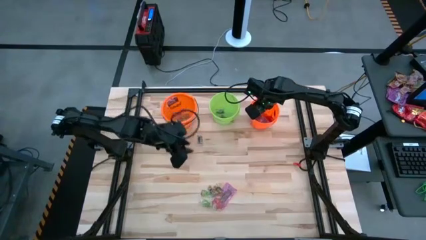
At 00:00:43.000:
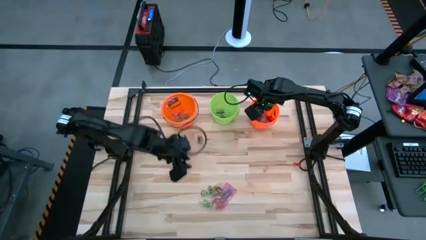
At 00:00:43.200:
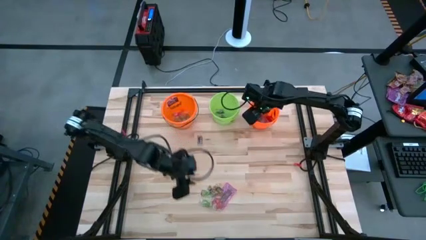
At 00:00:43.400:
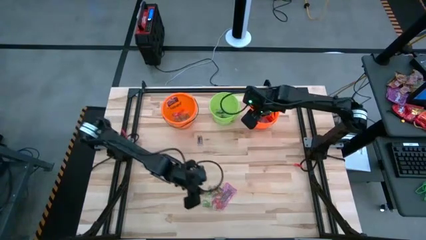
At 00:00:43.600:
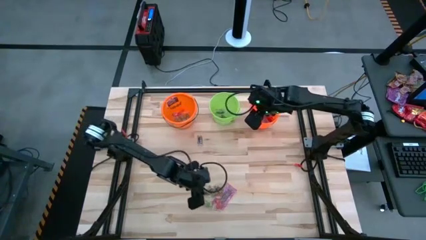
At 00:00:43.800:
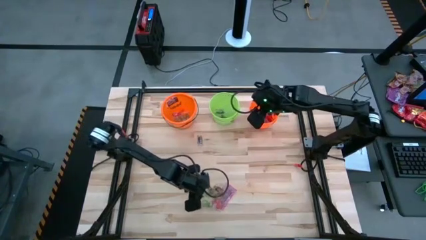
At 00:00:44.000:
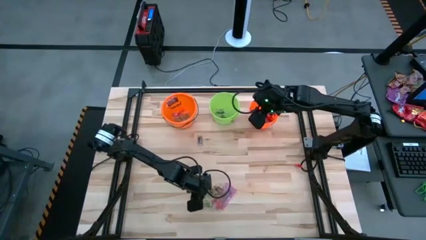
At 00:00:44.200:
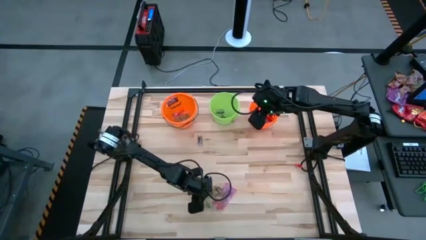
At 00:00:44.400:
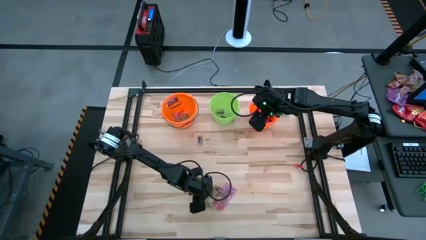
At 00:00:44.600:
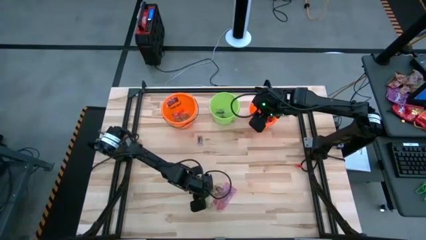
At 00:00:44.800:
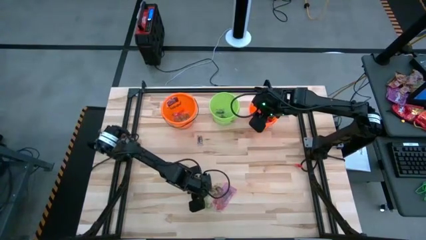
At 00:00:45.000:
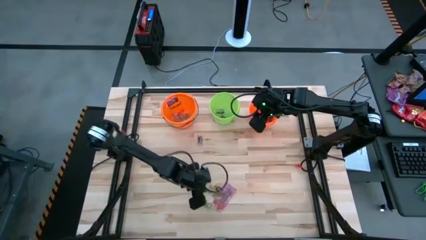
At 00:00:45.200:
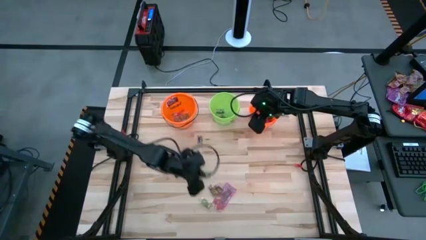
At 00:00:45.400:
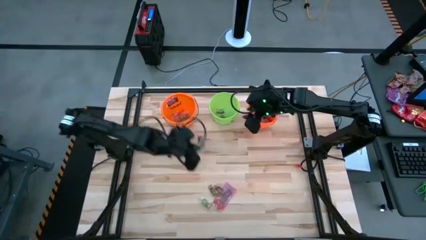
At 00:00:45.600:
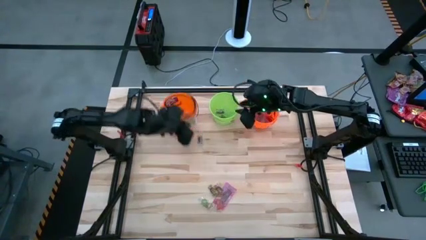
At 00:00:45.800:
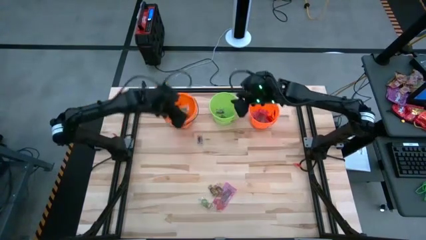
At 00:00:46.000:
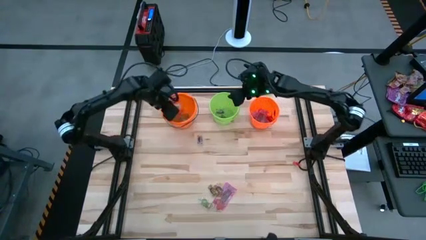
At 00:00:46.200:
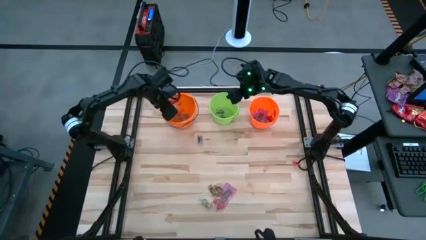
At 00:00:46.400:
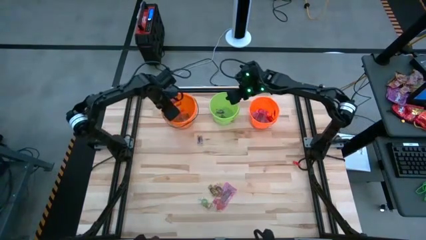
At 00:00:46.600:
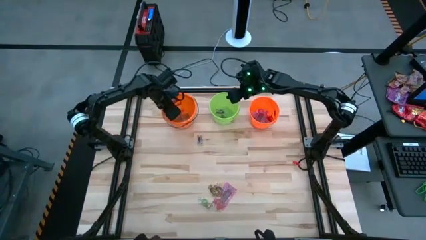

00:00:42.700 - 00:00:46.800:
Task: Sort candy by brand, put in halloween buckets
Put the green gummy into the left orange bucket

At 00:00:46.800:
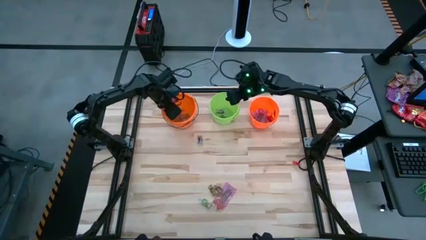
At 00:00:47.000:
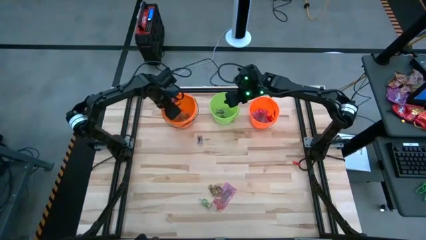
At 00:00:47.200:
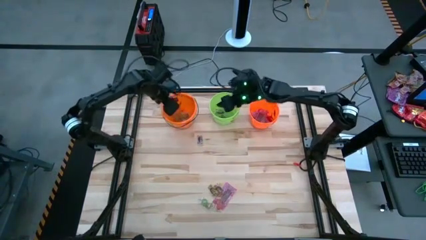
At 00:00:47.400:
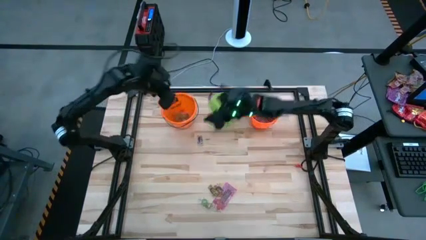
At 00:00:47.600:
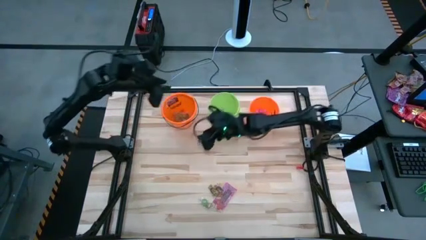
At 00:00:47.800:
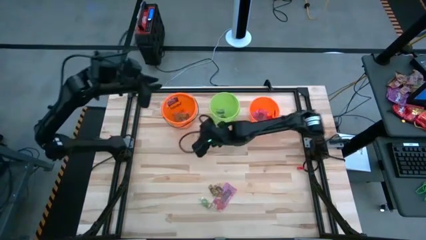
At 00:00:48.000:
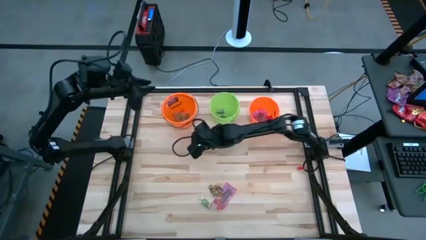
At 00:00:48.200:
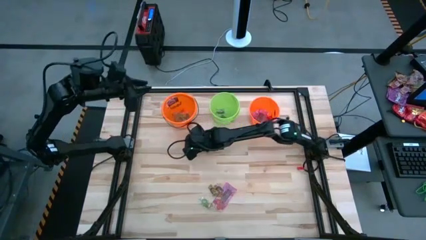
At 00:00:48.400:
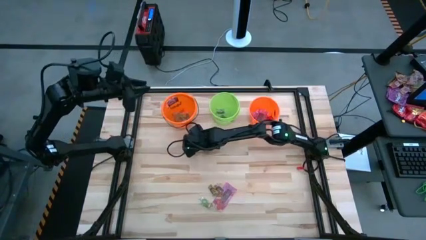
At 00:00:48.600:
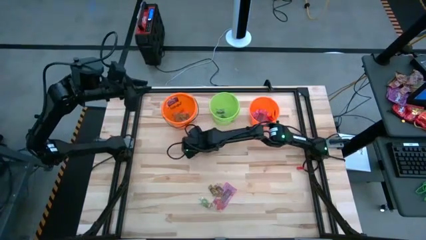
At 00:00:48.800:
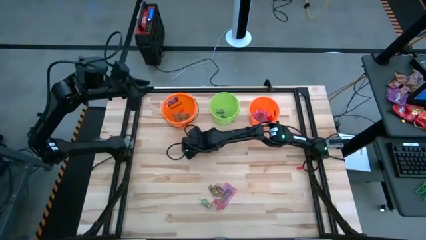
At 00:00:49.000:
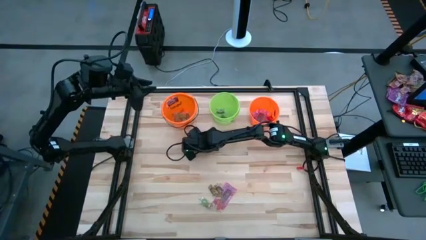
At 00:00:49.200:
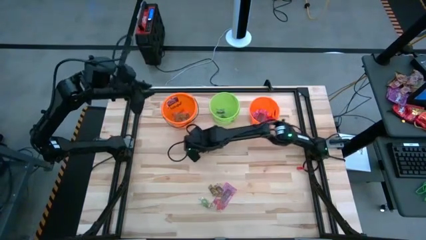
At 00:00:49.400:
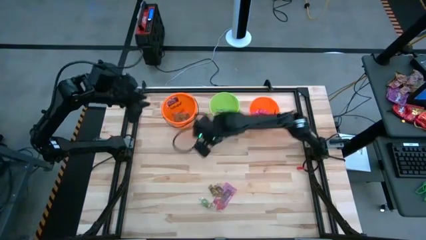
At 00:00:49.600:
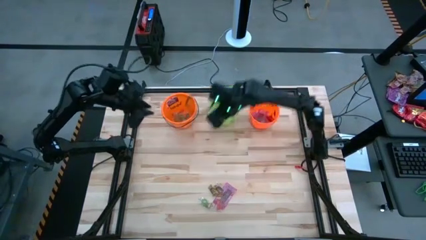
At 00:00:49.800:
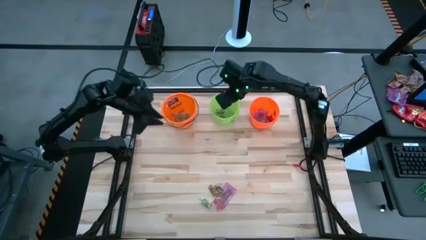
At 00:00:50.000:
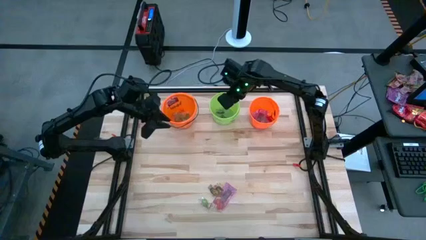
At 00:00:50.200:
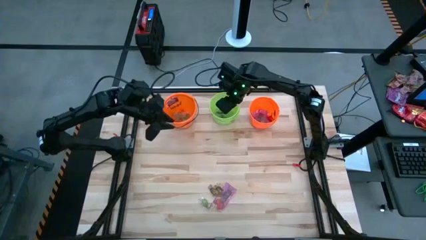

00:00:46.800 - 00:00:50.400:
Put the black candy into the green bucket

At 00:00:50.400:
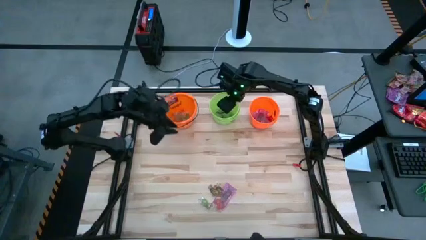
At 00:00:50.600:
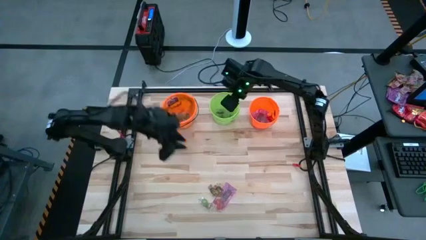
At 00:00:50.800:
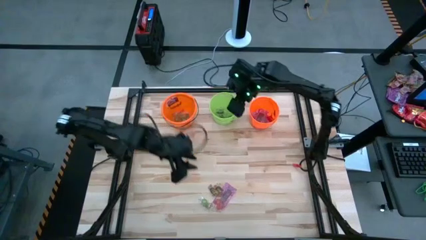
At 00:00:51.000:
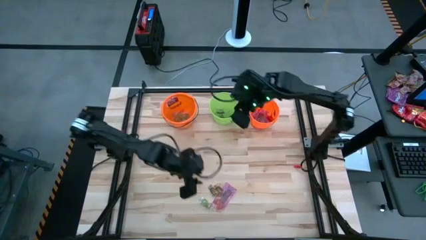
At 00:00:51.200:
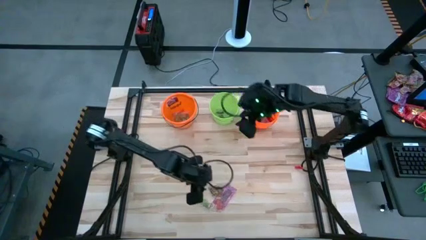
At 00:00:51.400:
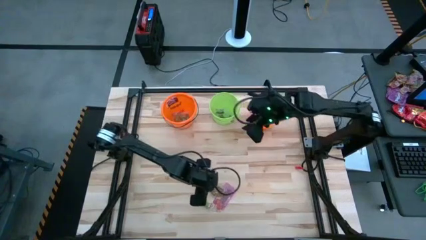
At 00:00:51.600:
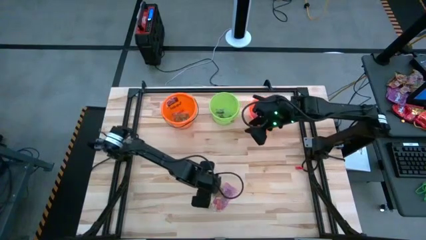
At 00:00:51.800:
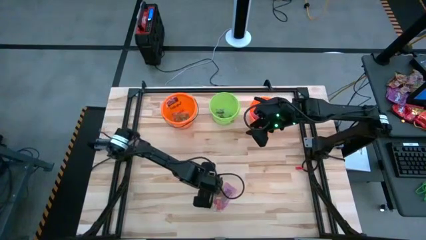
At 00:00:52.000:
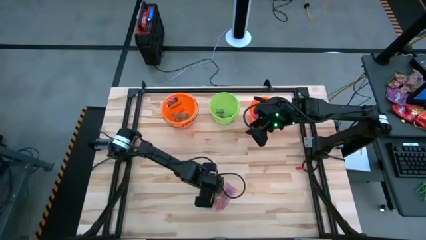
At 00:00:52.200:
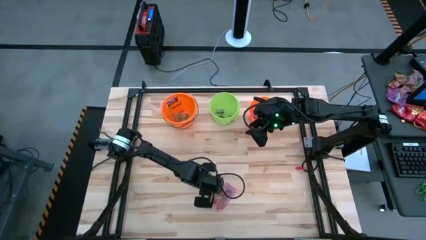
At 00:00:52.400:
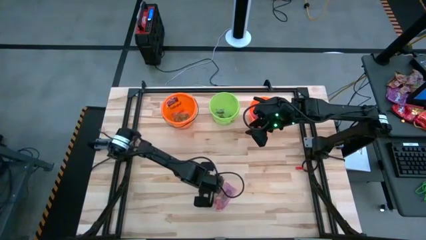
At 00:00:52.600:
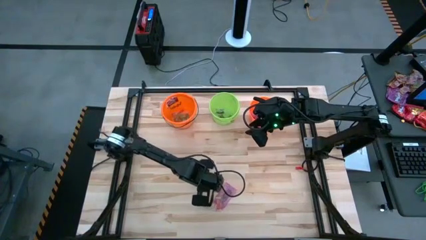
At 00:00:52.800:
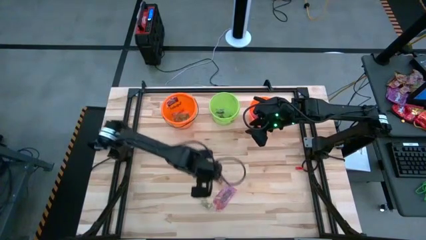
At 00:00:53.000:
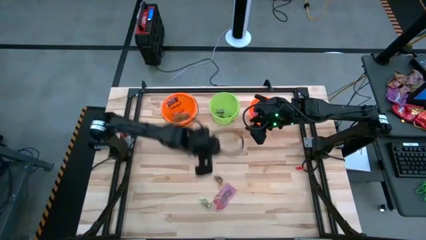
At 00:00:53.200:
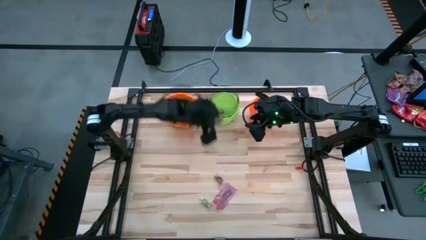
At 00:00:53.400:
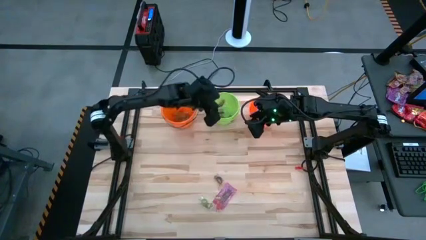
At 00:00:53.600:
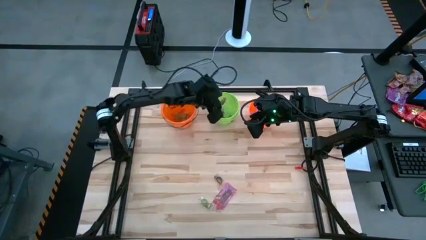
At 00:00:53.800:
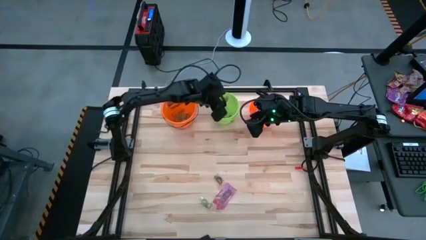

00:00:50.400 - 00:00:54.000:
Put the black candy into the green bucket

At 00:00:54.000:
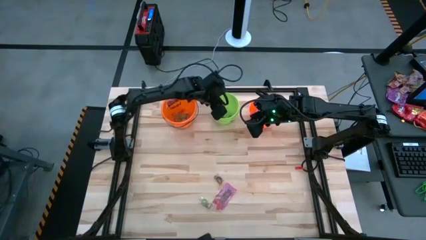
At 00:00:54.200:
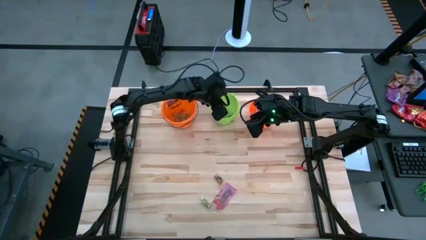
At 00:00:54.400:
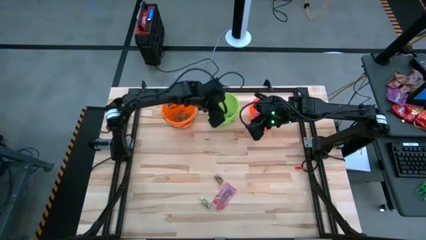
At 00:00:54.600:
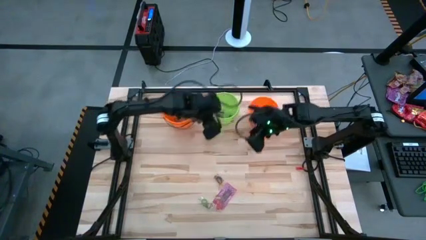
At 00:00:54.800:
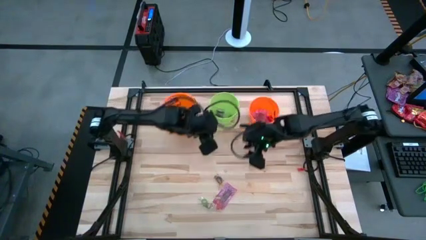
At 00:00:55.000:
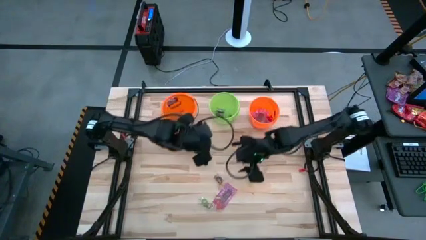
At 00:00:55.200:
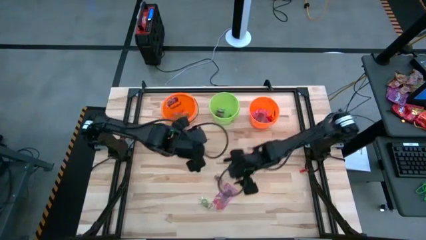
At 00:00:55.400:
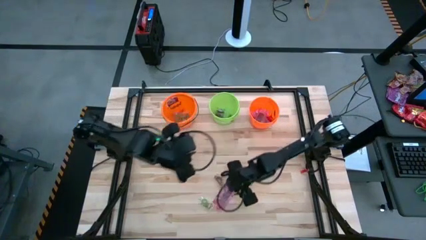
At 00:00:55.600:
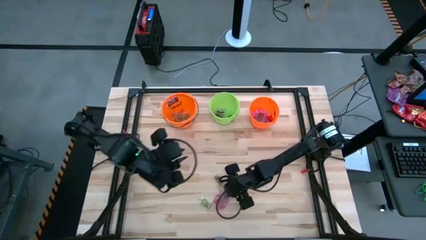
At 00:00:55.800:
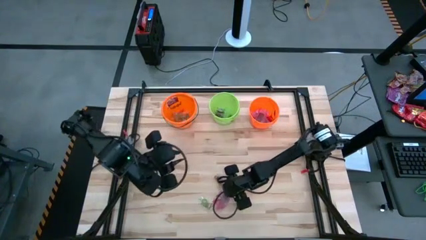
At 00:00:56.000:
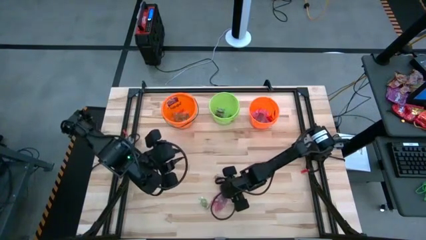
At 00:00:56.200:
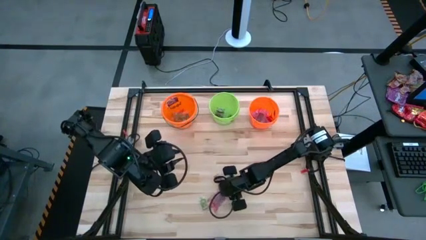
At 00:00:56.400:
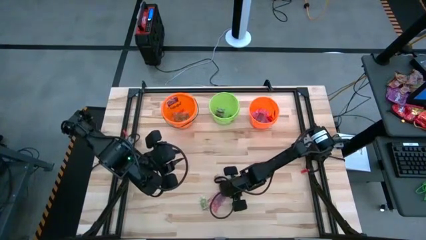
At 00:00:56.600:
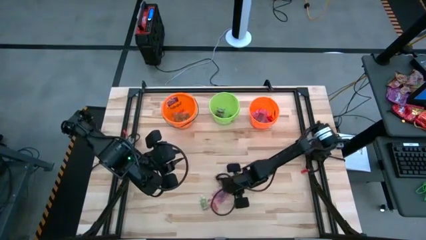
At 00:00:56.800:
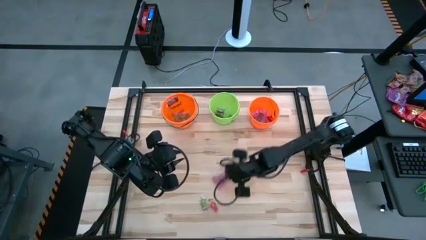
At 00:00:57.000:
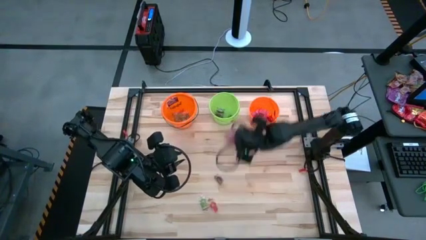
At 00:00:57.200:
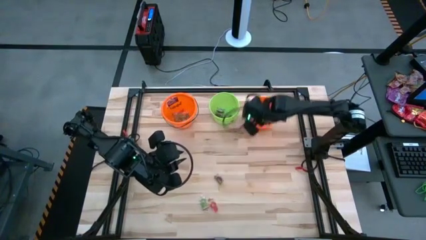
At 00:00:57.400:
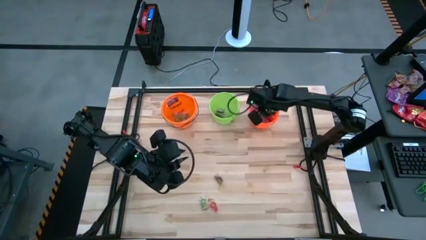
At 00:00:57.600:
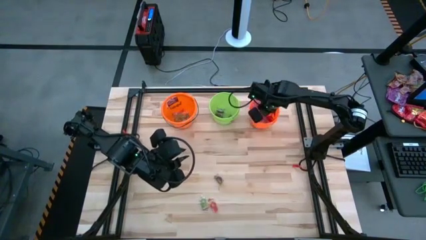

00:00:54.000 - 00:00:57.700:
Put the red candy into the right orange bucket

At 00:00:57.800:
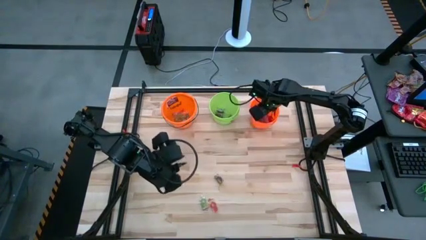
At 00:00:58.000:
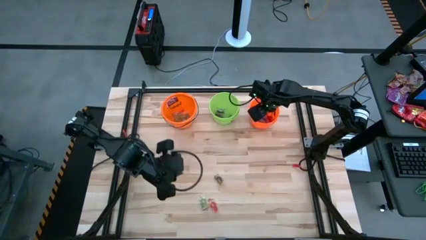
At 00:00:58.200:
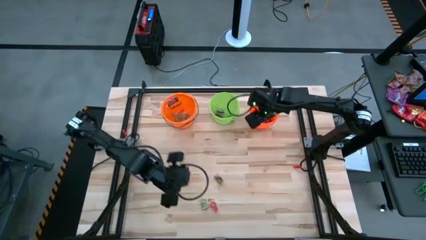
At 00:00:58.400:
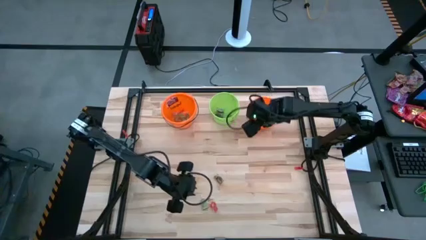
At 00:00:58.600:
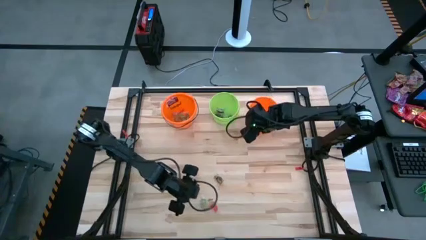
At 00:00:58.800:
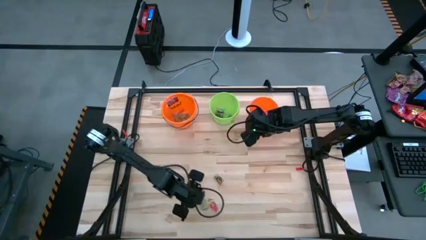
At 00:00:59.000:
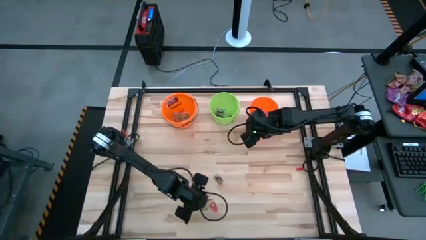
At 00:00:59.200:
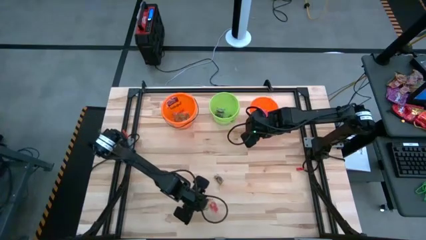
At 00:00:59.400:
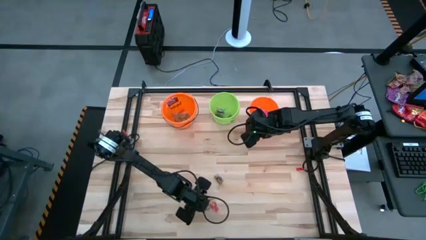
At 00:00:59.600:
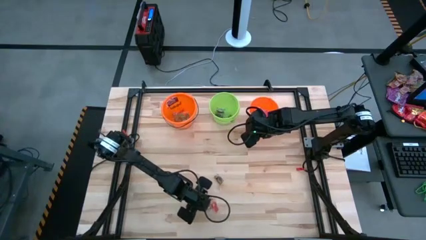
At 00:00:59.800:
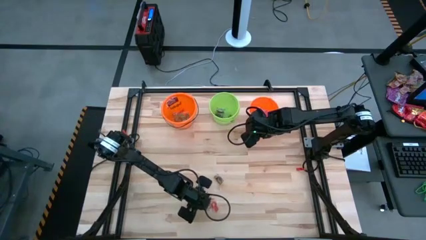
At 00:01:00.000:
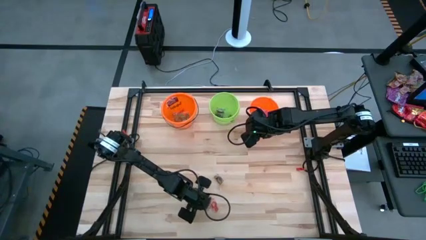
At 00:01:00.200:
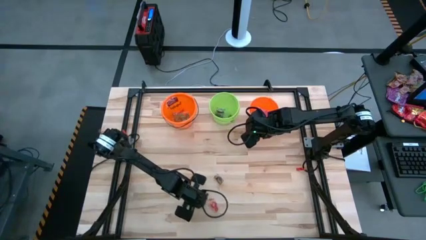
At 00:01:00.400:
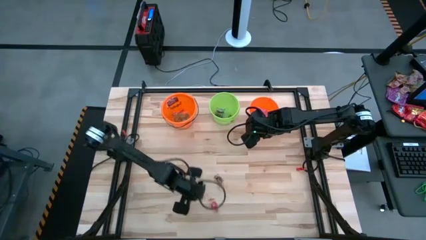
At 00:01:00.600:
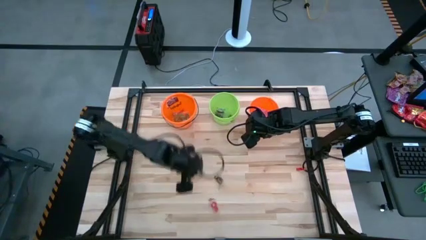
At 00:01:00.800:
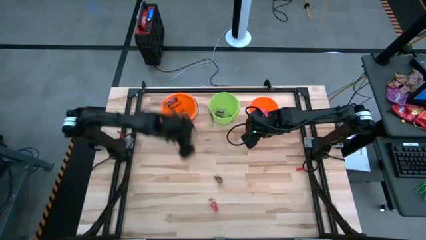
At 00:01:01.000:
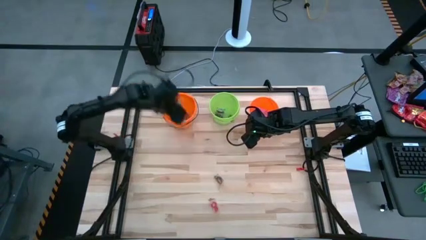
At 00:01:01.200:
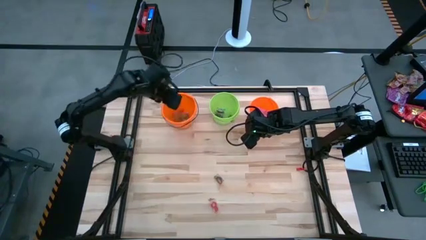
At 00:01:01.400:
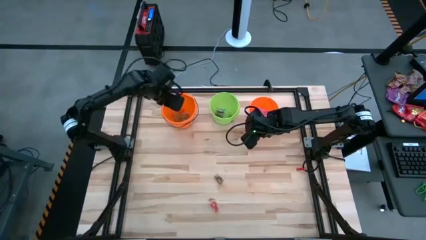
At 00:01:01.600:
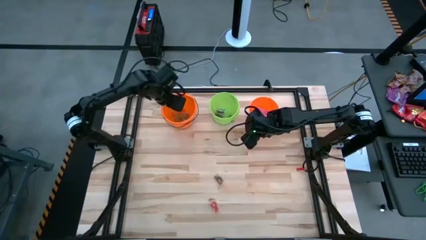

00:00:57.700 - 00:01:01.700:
Put the green gummy into the left orange bucket
